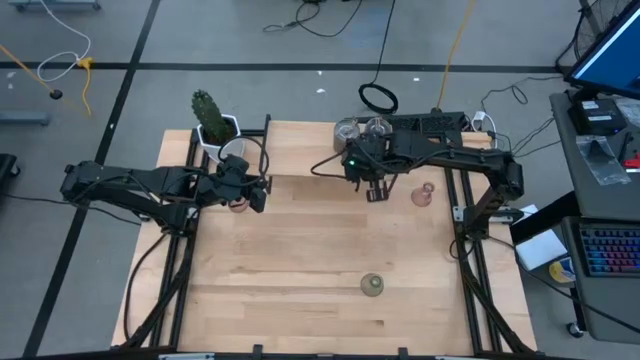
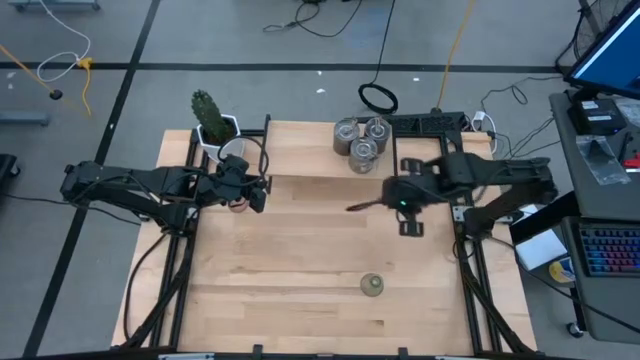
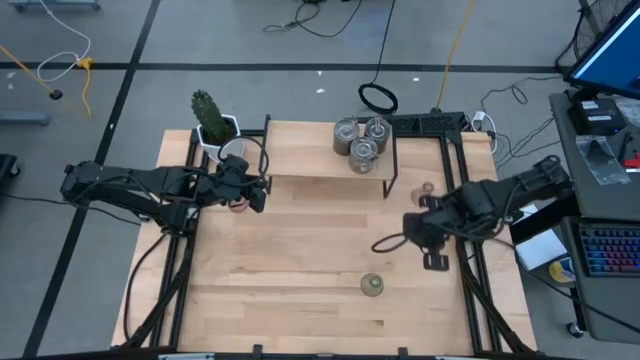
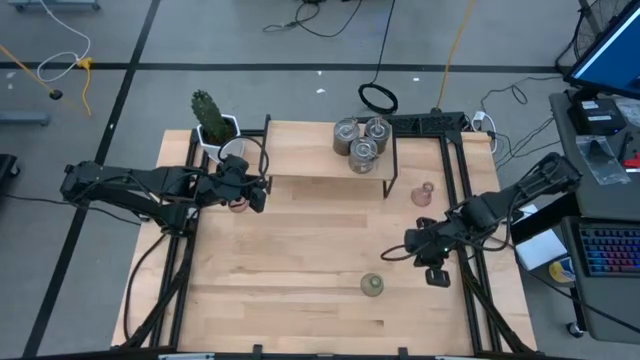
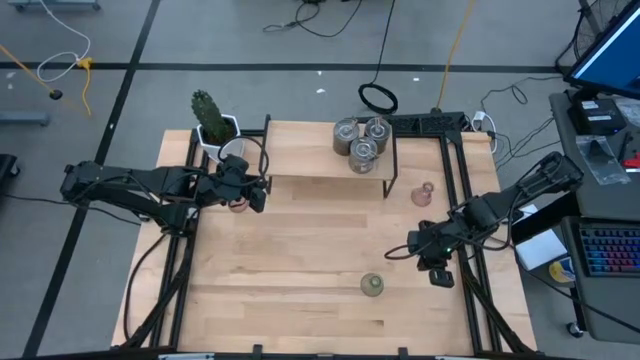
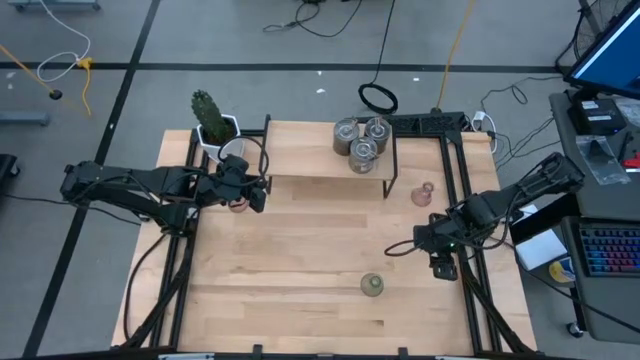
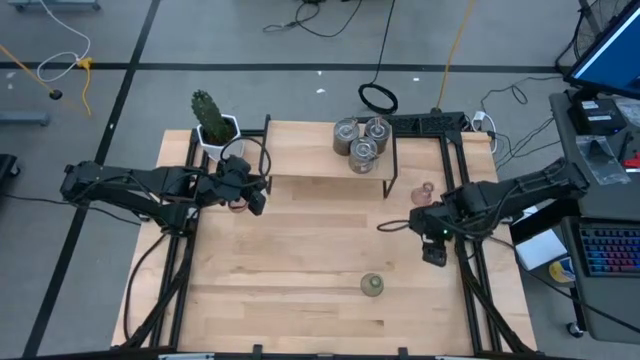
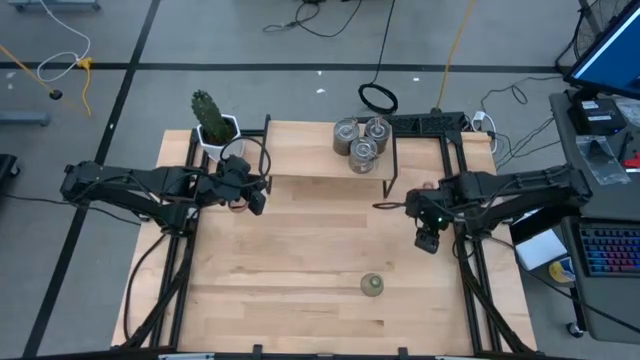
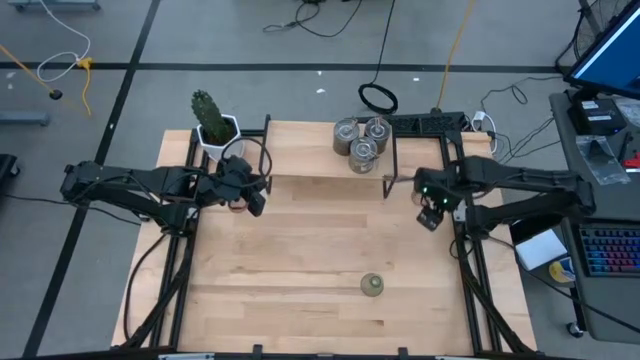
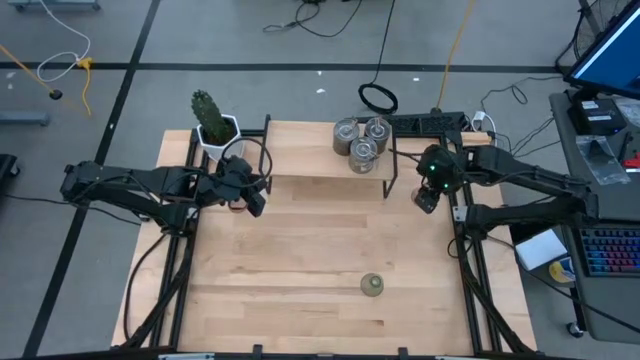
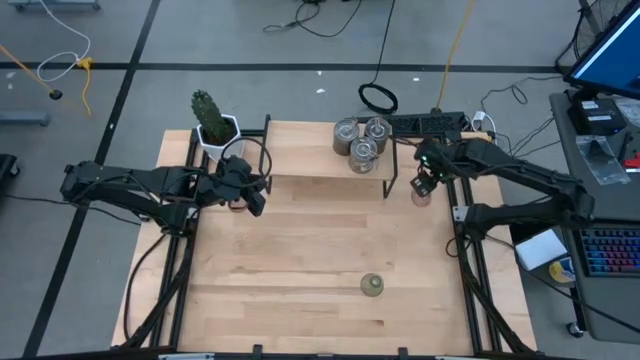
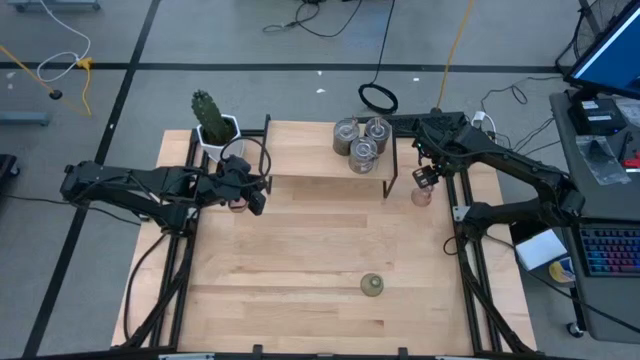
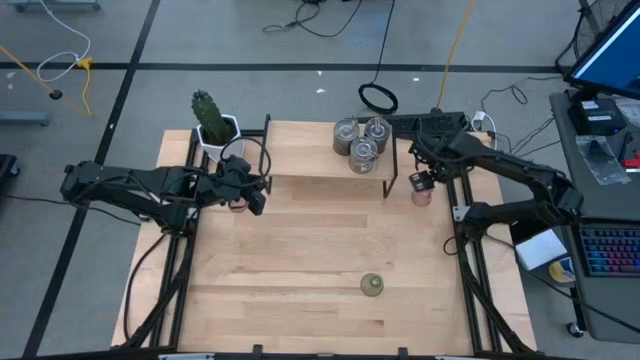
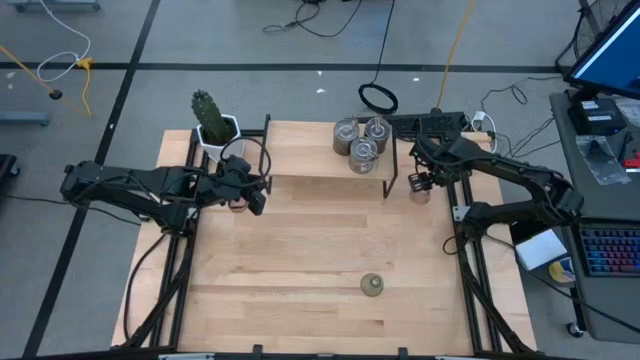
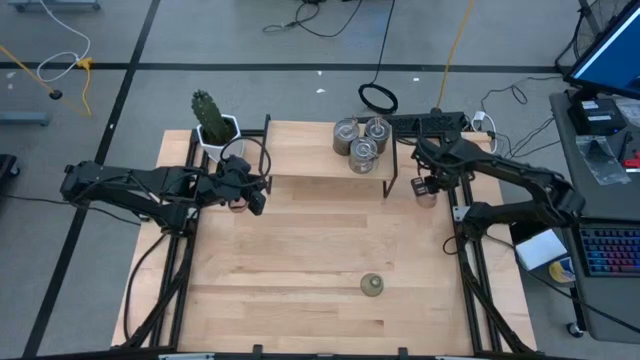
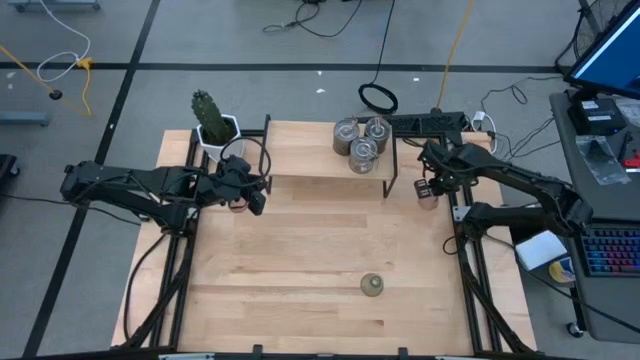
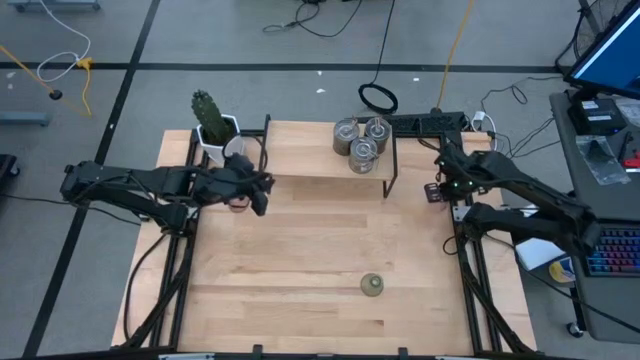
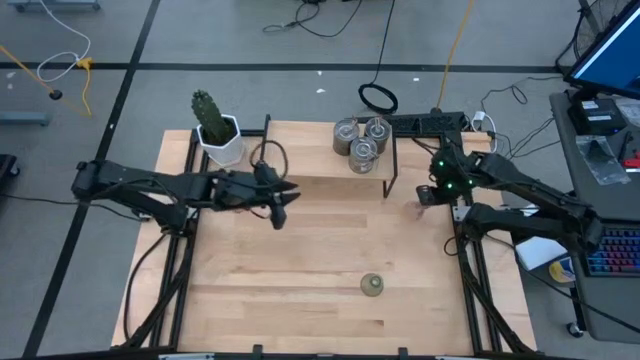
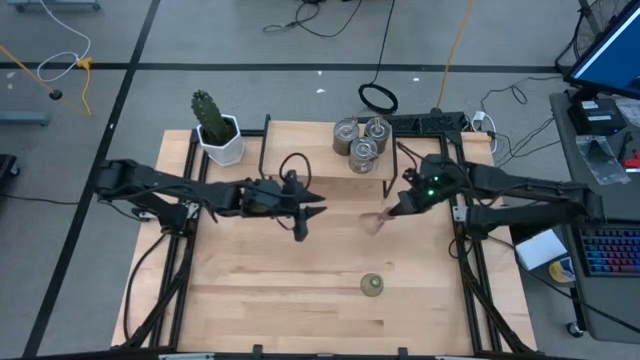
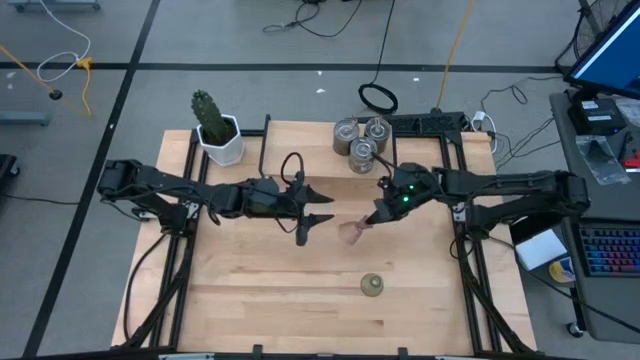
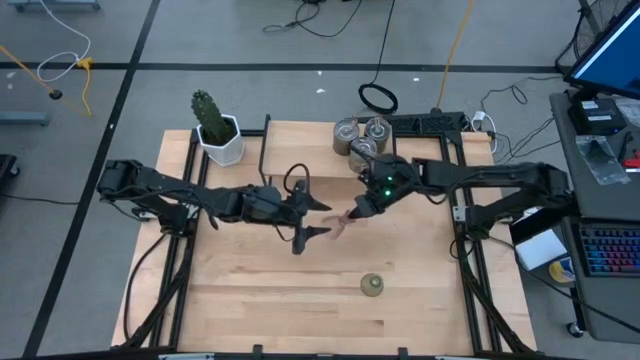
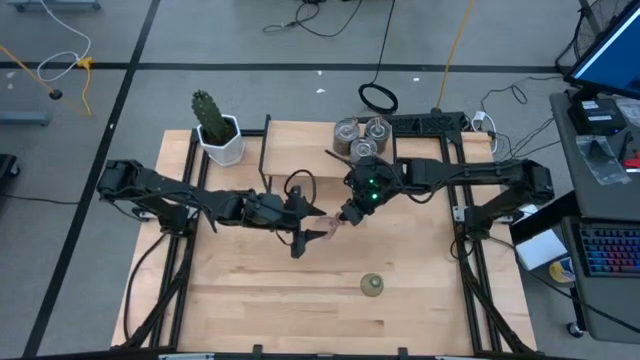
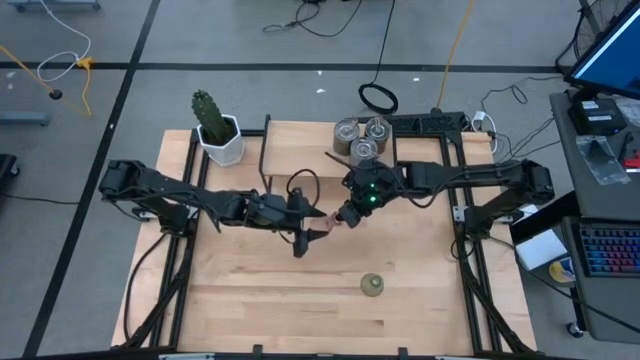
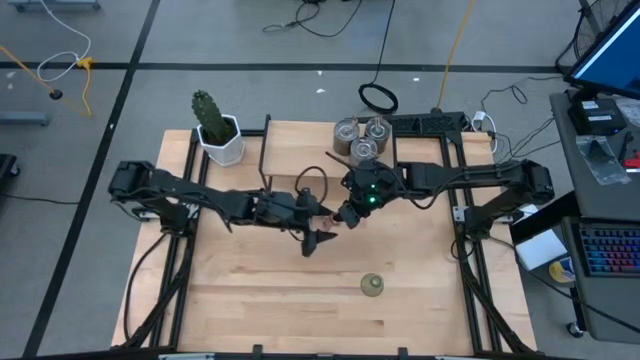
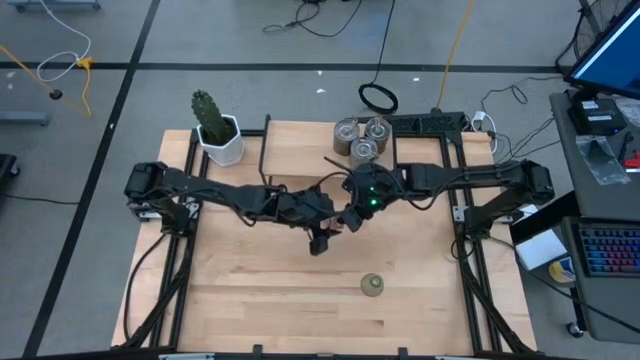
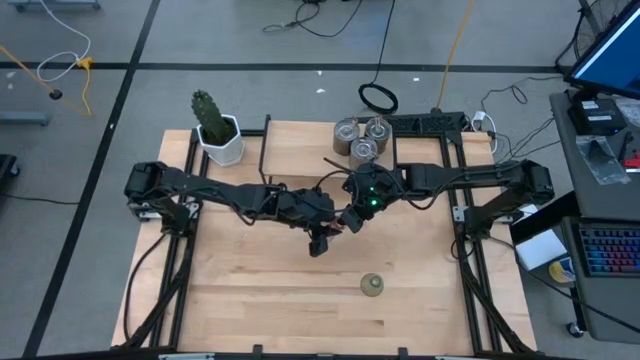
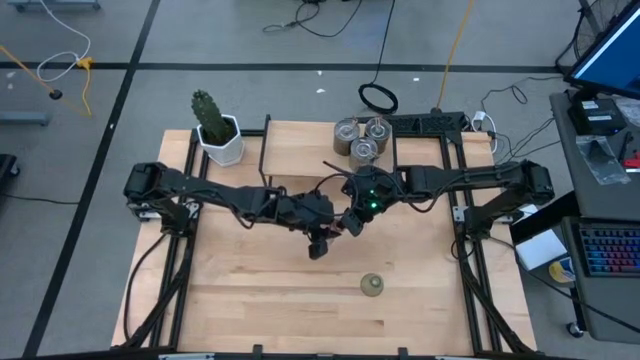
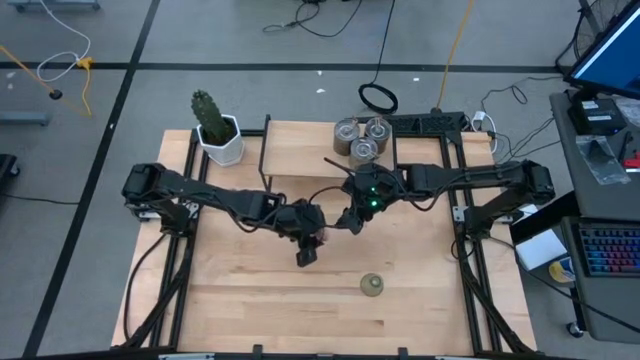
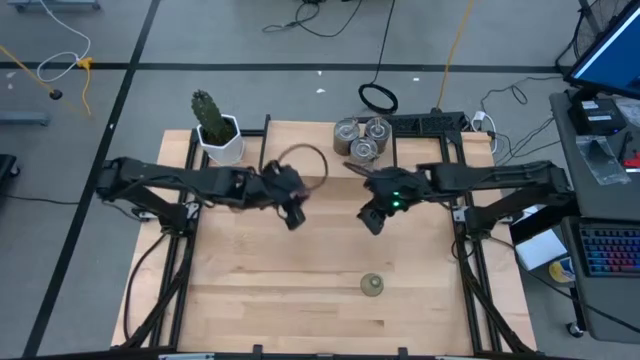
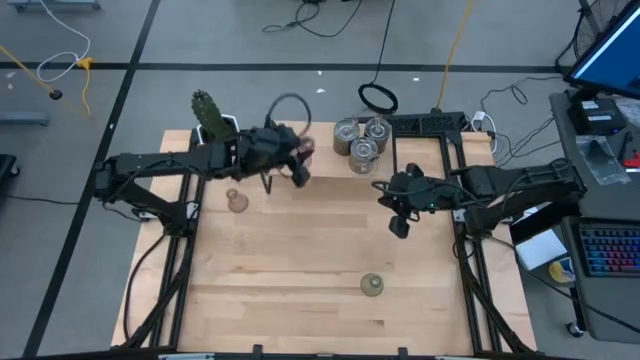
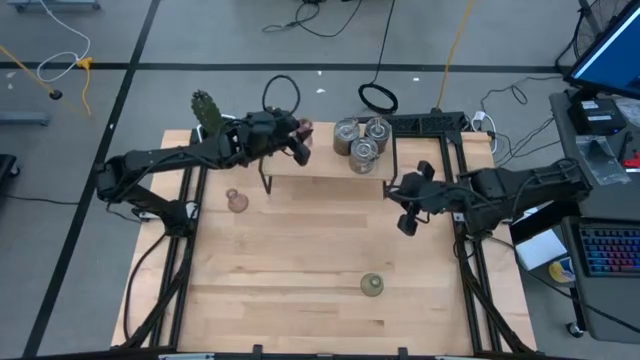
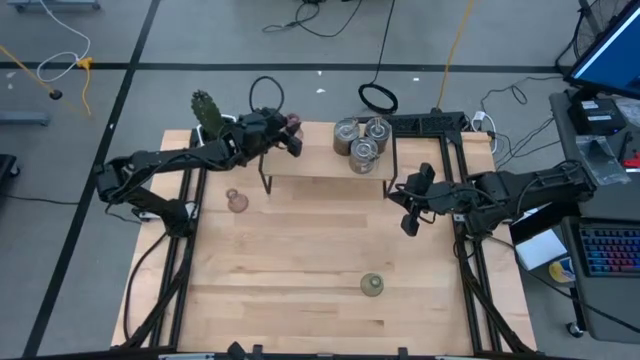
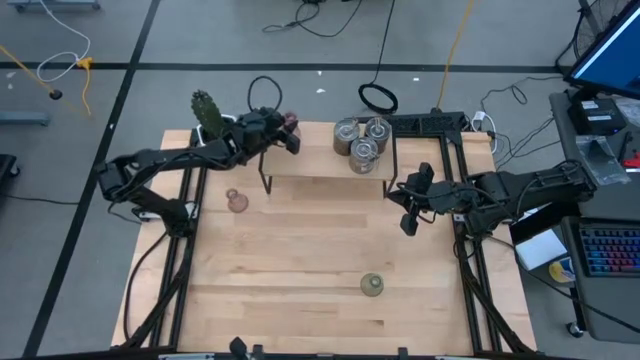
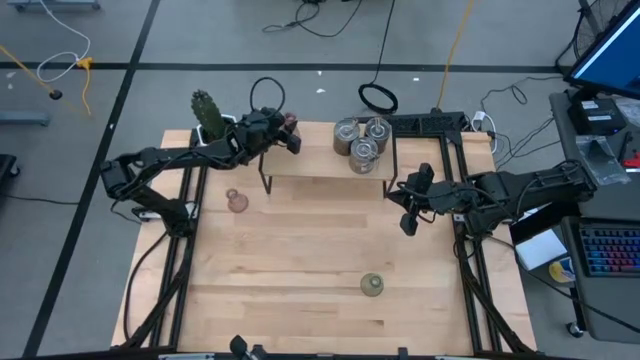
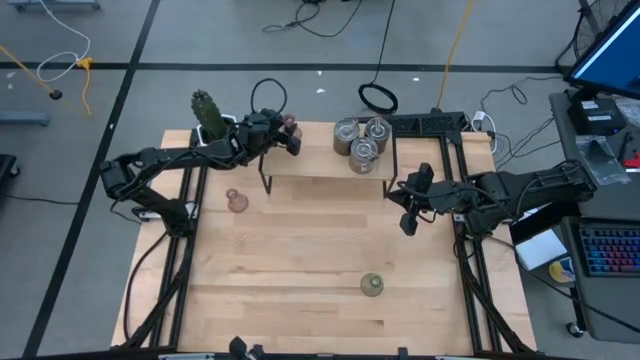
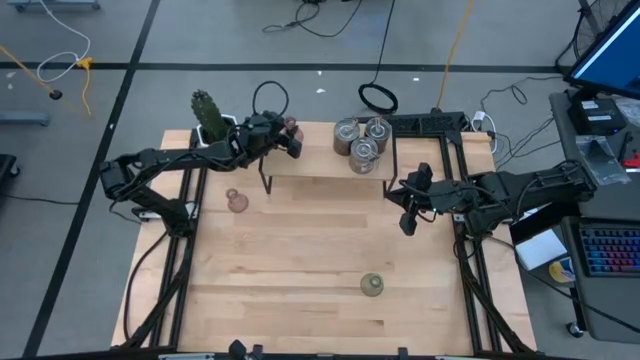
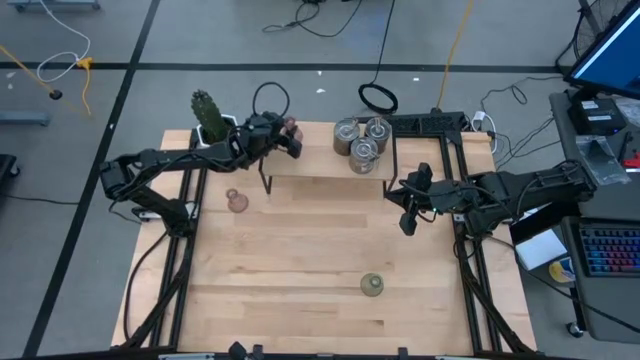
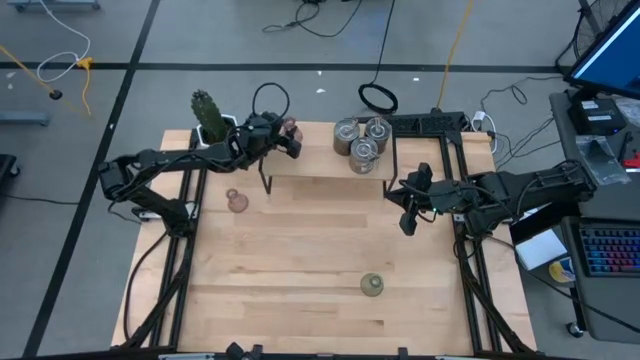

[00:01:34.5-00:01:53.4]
Task: Pick & Place candle stick holders
Put the right purple glass candle holder on the shelf

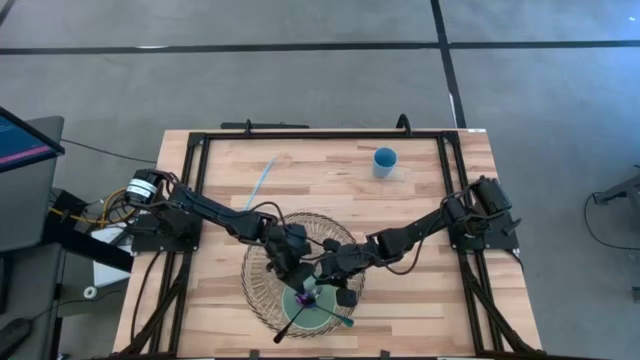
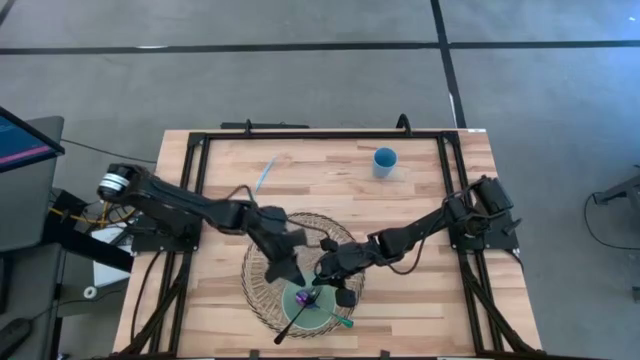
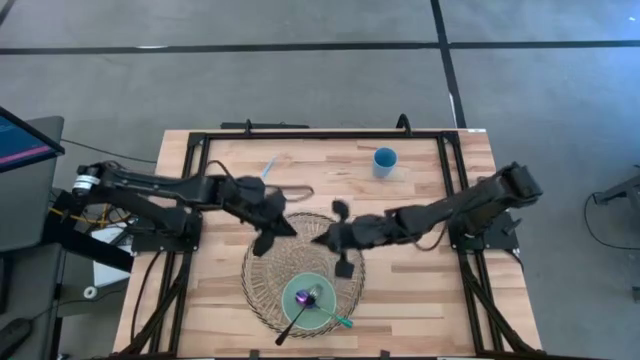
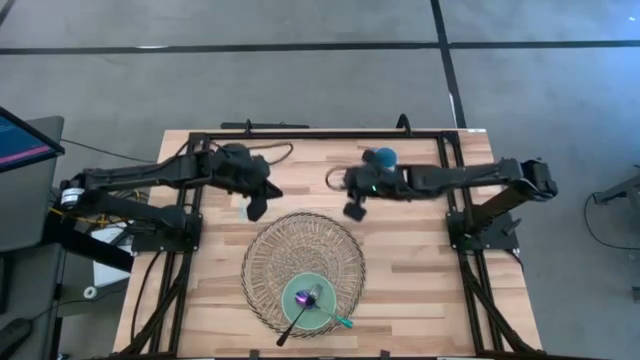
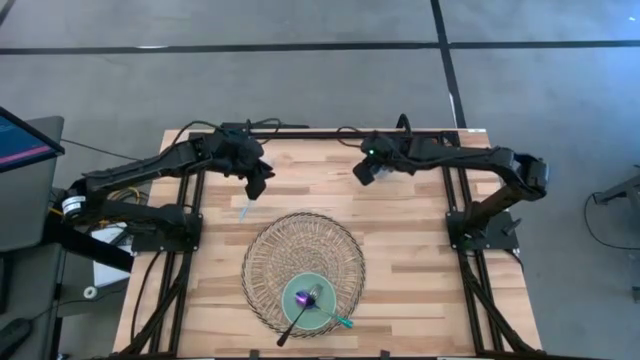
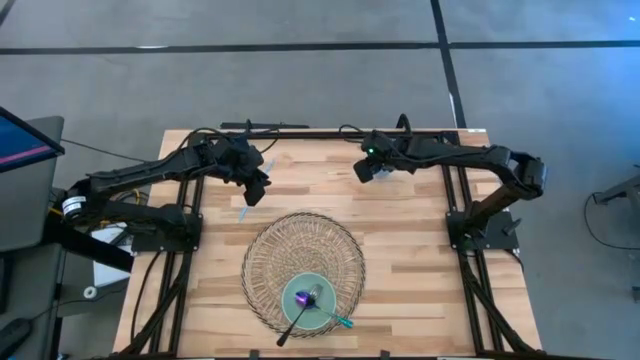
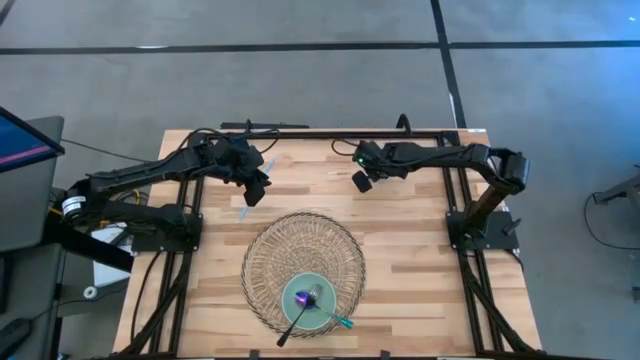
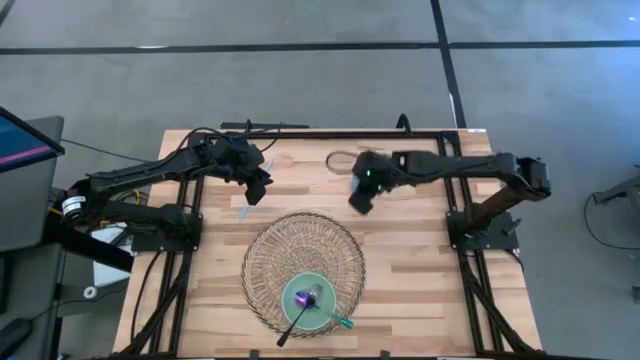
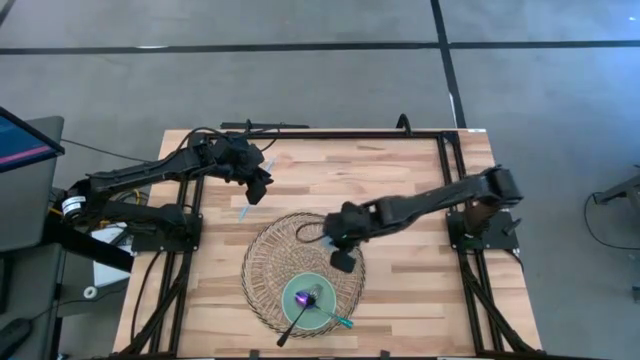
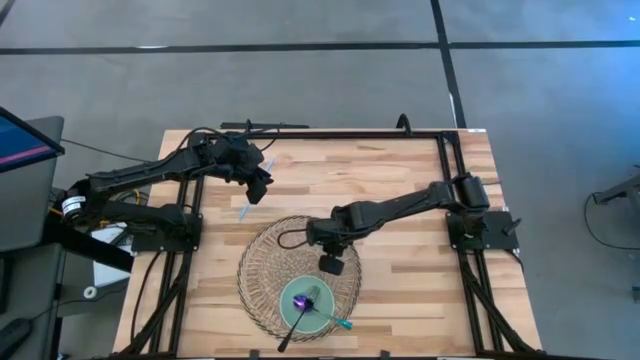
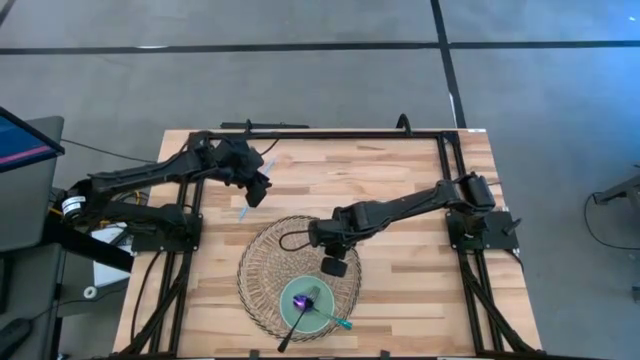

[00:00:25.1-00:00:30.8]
Task: Pick & Place Utensil
Put the blue cup on the top right of the brown mat
